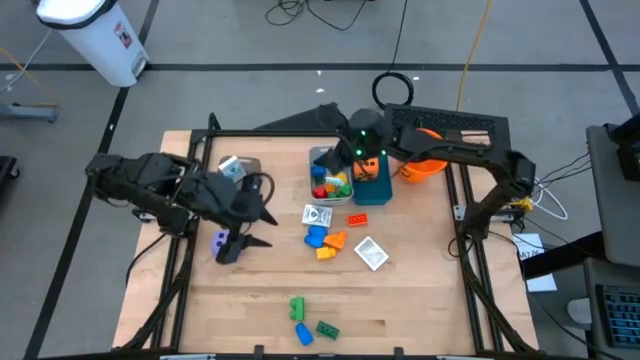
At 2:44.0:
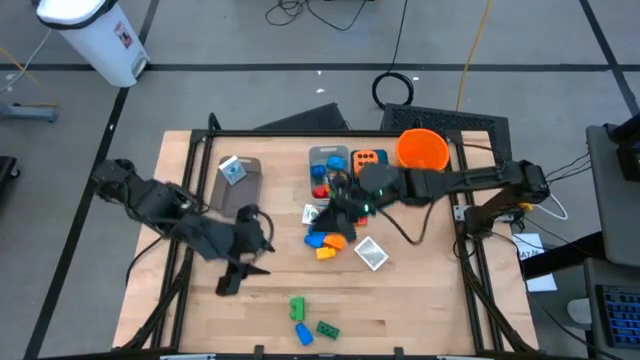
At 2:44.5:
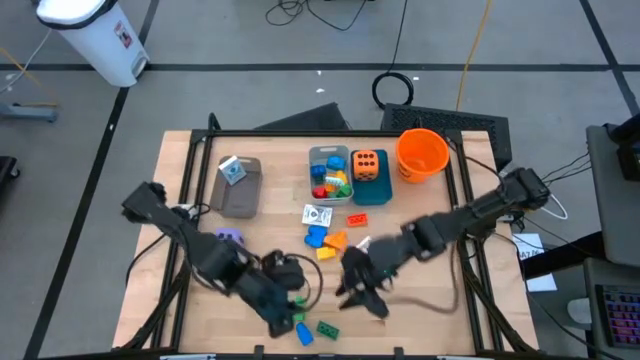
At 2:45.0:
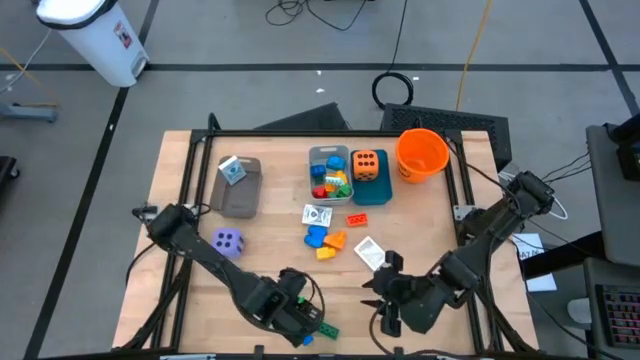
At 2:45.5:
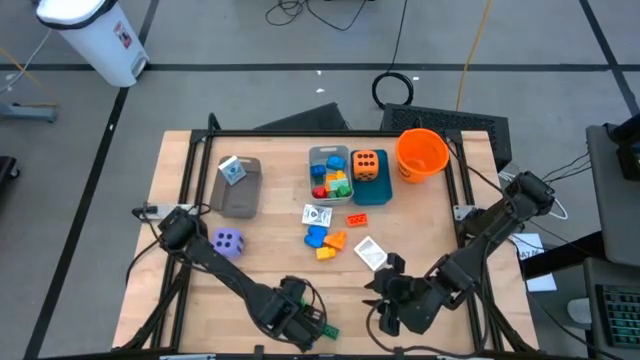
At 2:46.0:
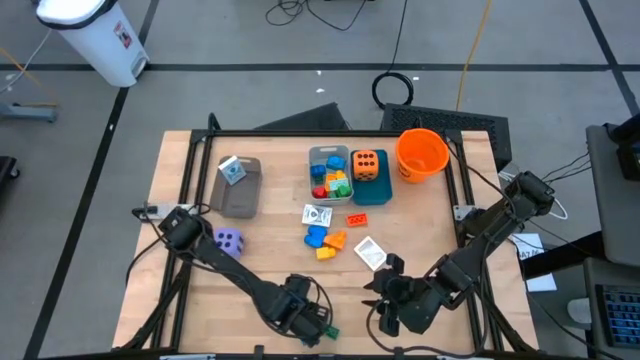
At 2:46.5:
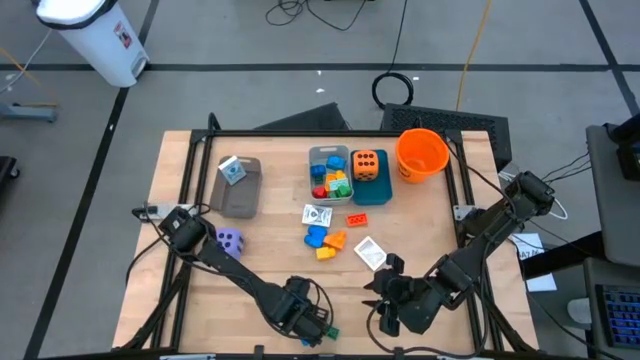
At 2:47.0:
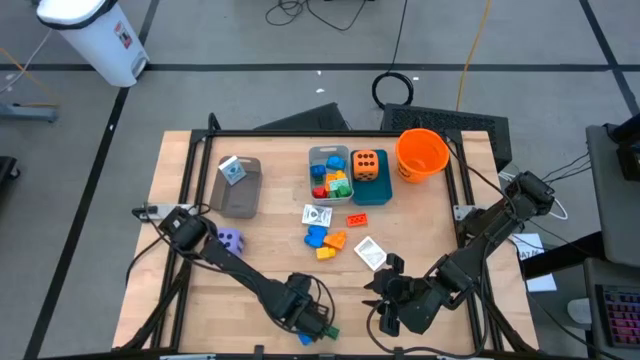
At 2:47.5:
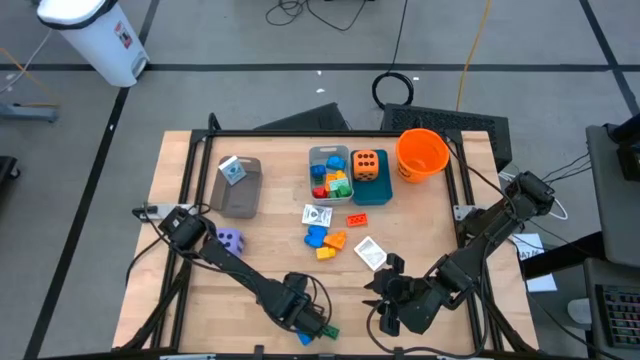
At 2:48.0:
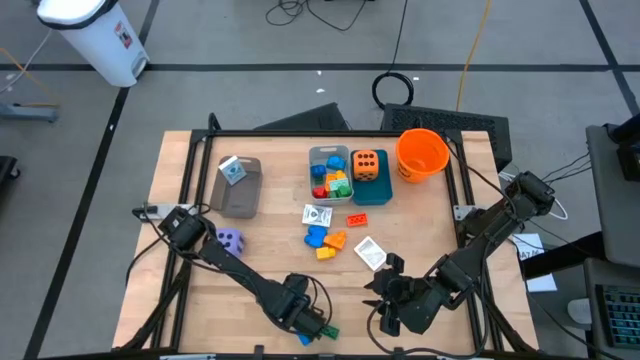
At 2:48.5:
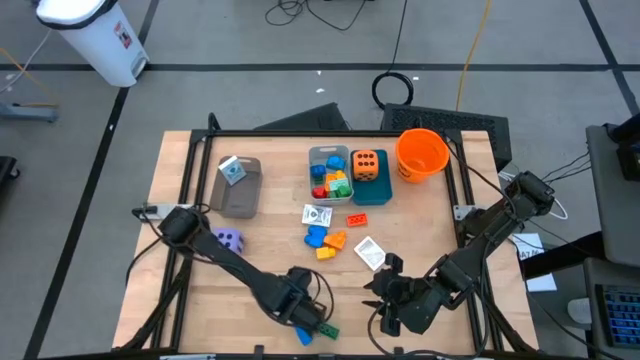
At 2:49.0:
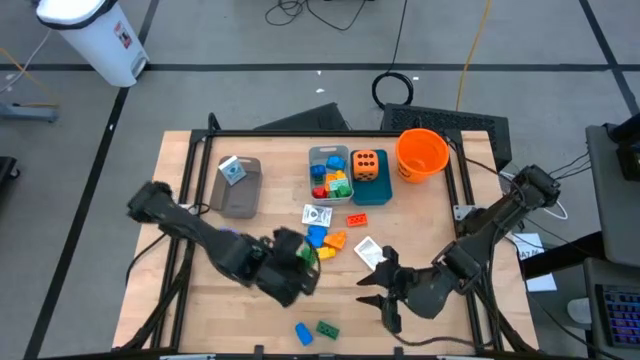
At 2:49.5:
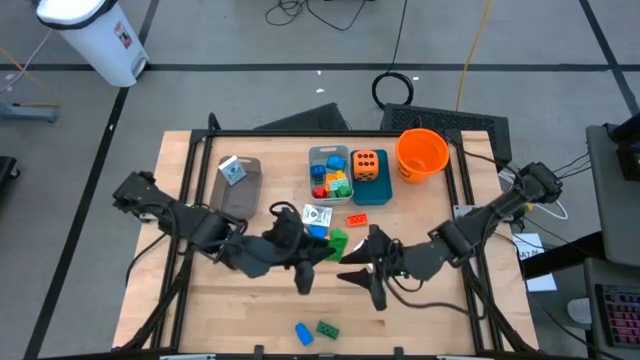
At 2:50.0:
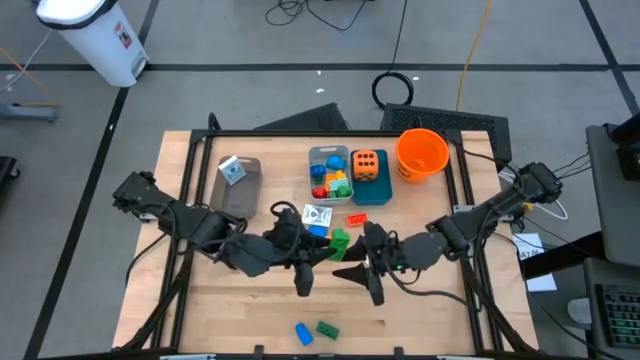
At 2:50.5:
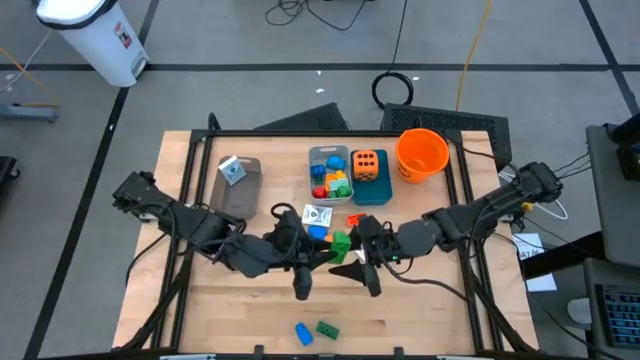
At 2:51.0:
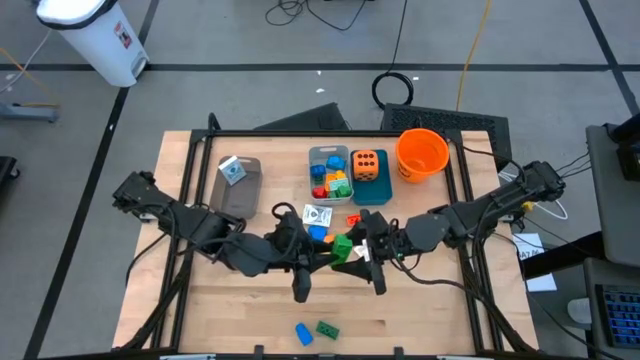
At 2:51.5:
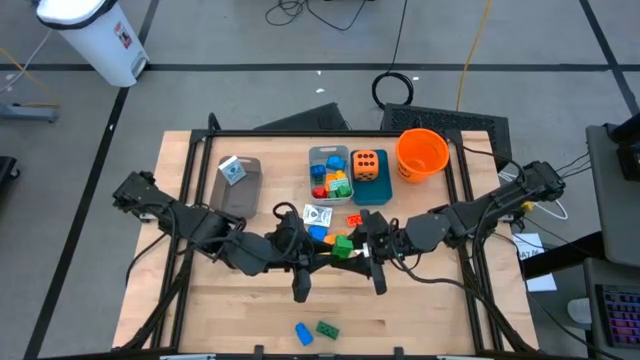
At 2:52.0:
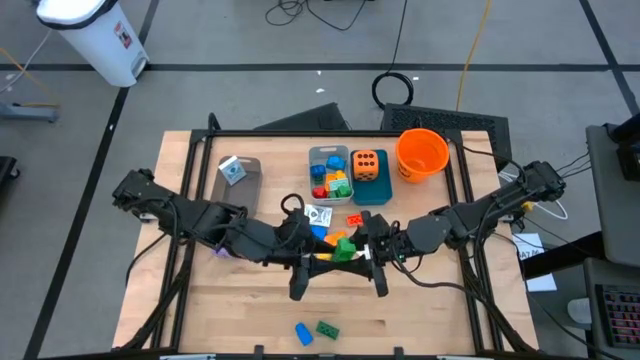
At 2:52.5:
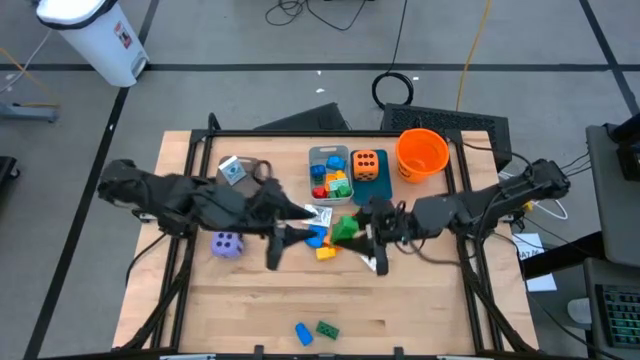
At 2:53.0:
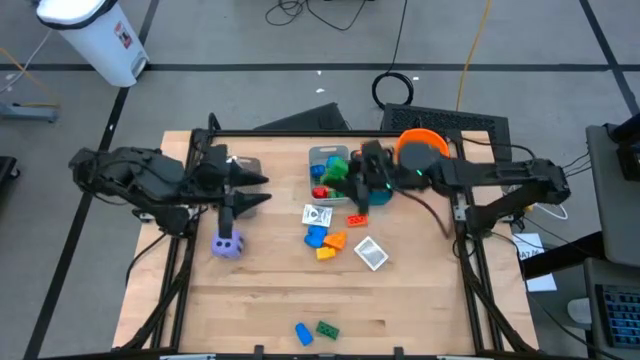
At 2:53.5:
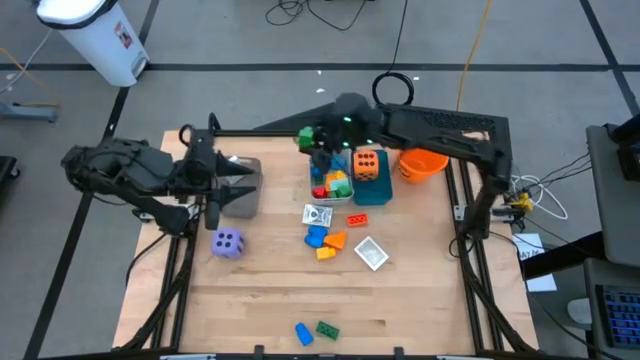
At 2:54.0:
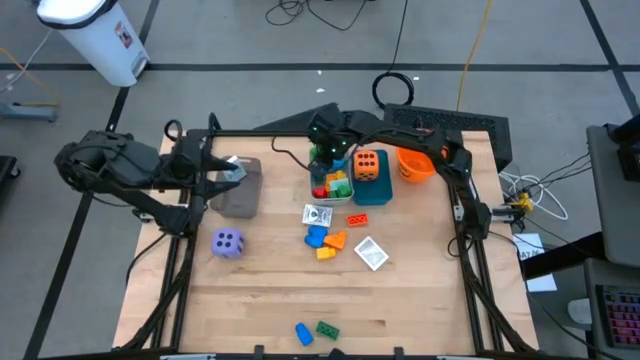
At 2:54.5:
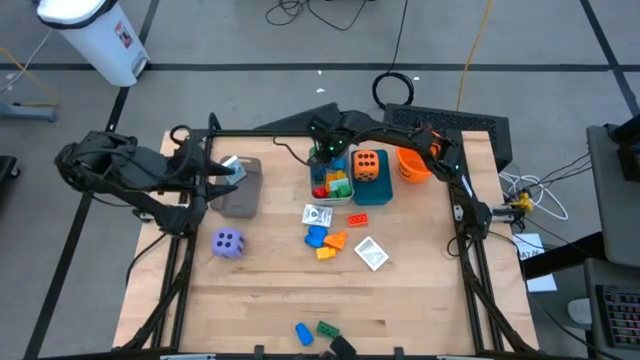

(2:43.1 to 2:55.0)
Task: Pick & Place Toys
Put the green game piece into the gray bin

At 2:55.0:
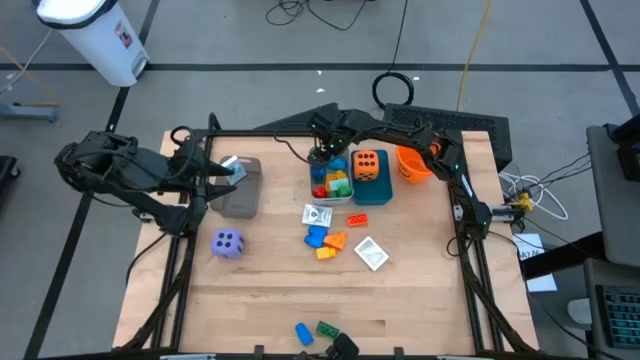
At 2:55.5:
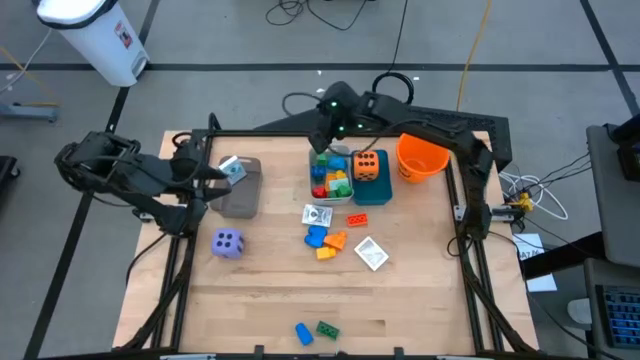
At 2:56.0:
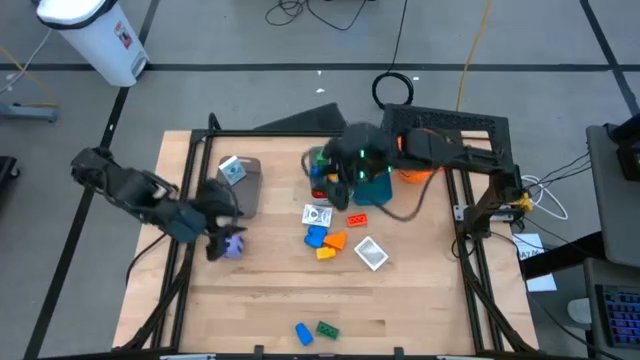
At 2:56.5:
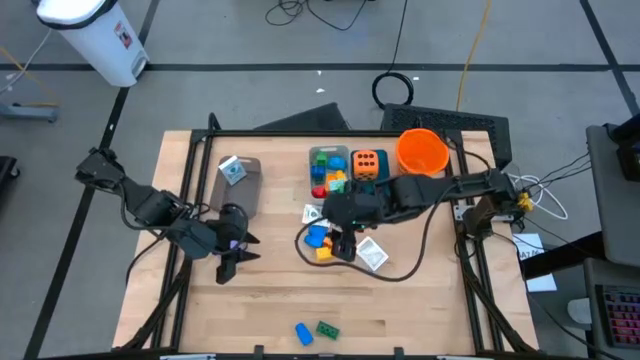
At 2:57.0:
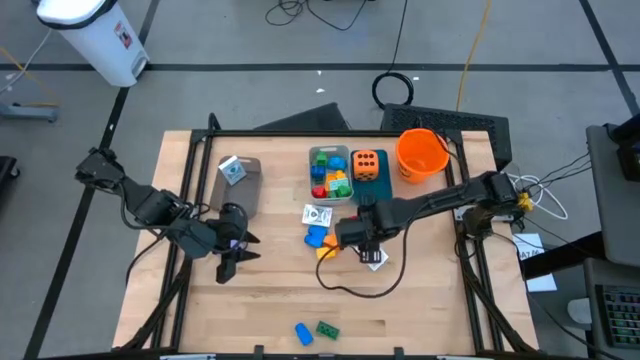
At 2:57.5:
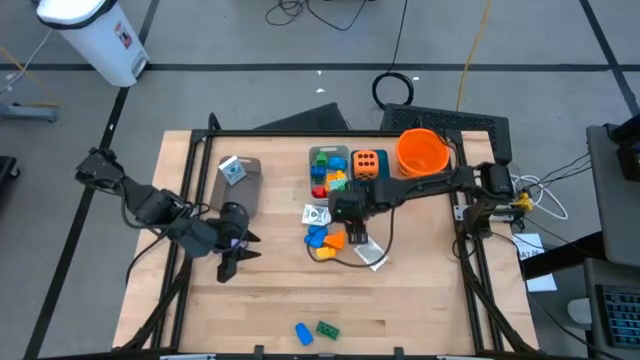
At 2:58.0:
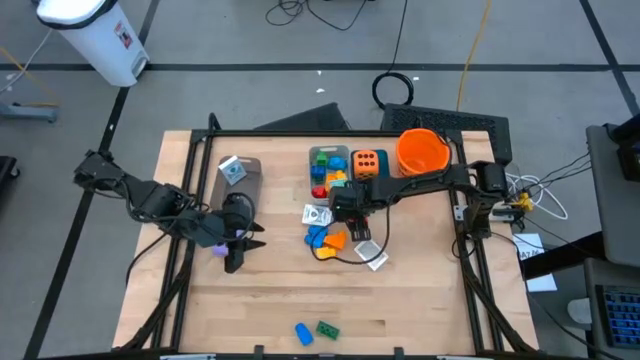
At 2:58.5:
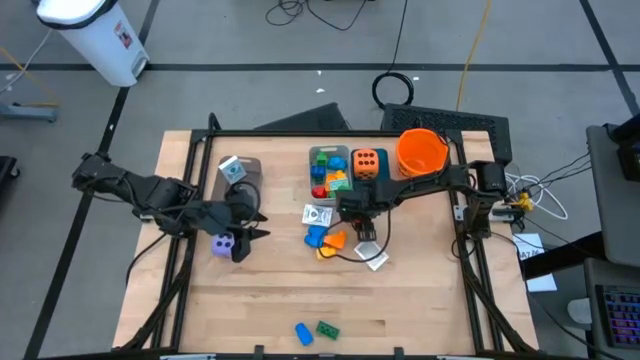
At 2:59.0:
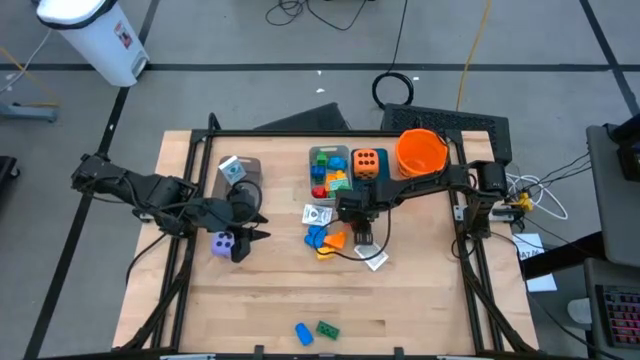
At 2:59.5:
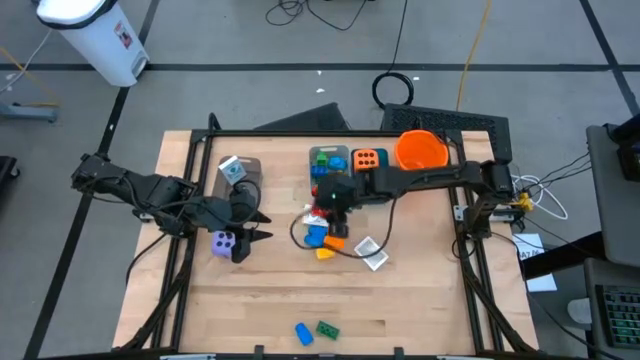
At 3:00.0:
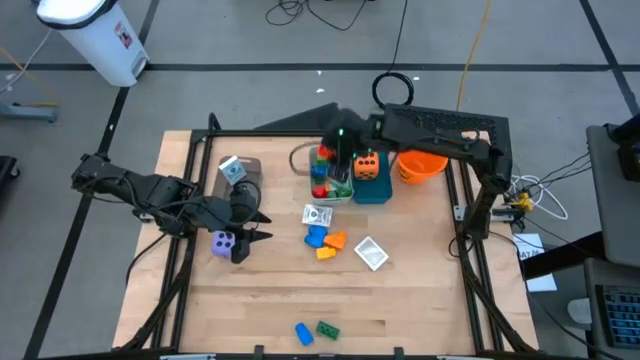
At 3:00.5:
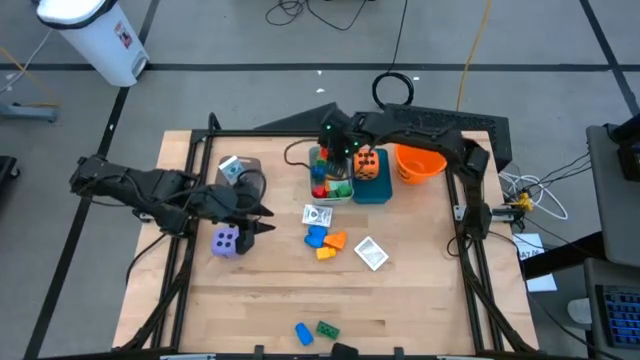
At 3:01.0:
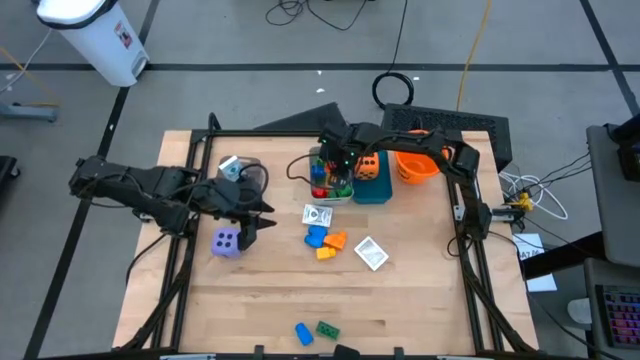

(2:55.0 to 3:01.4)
Put the orange game piece into the gray bin
